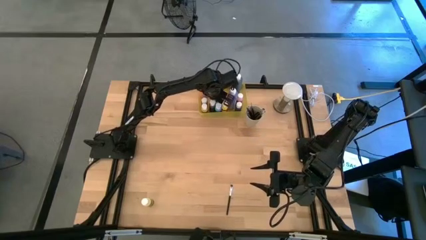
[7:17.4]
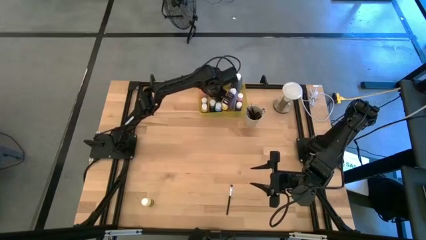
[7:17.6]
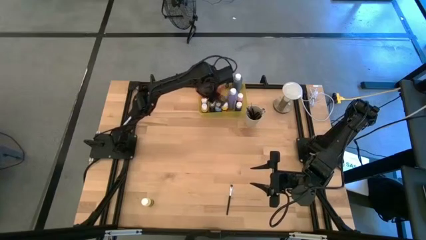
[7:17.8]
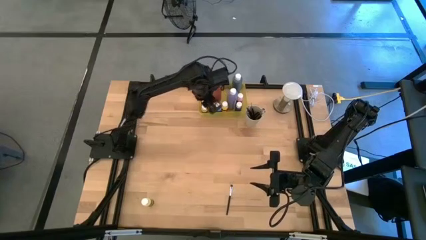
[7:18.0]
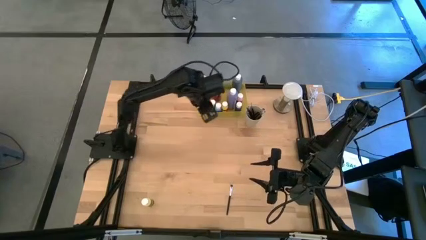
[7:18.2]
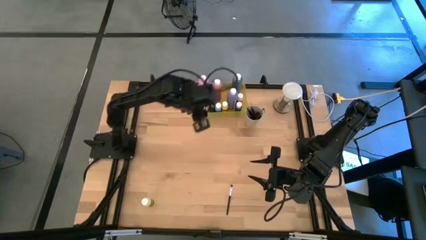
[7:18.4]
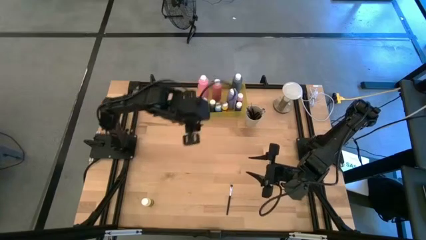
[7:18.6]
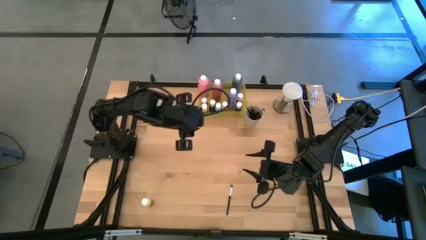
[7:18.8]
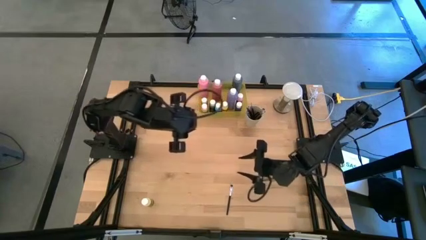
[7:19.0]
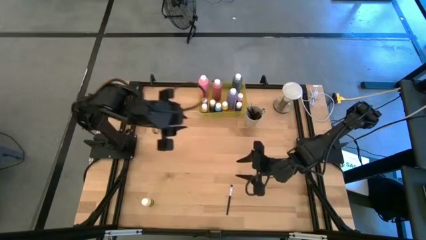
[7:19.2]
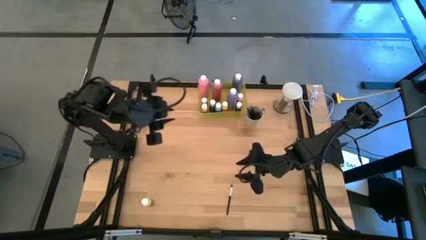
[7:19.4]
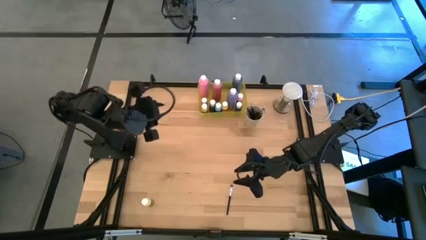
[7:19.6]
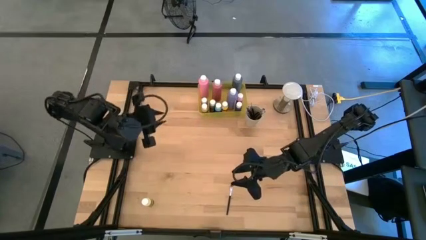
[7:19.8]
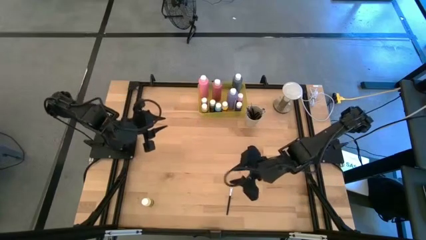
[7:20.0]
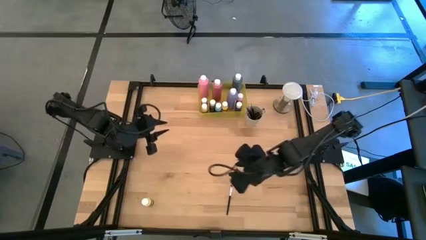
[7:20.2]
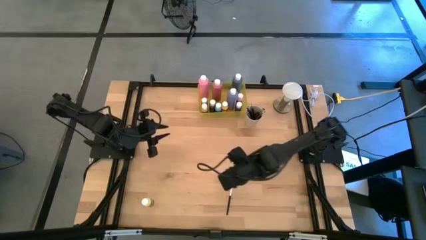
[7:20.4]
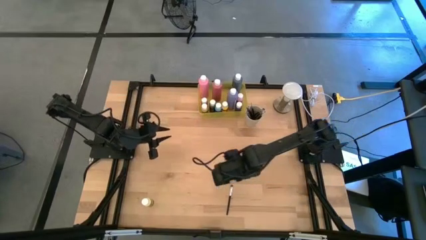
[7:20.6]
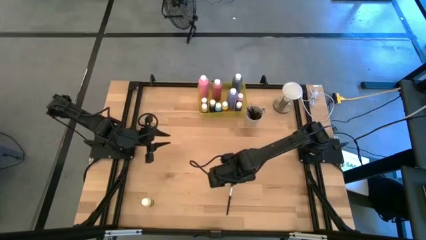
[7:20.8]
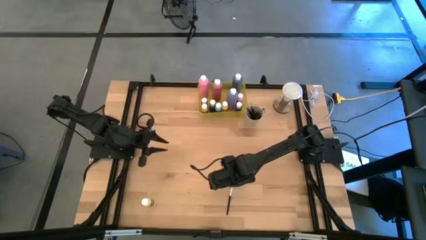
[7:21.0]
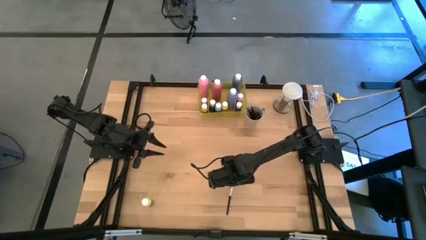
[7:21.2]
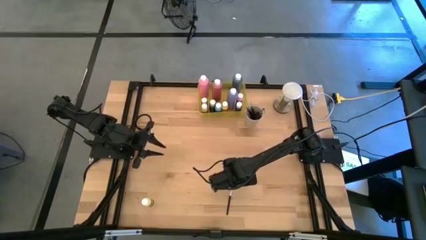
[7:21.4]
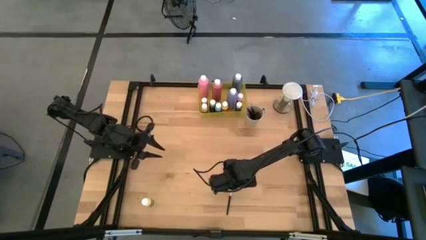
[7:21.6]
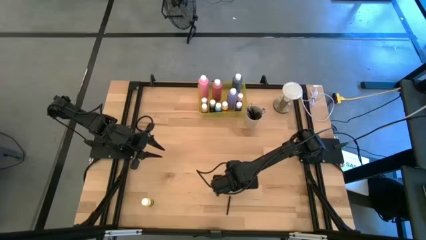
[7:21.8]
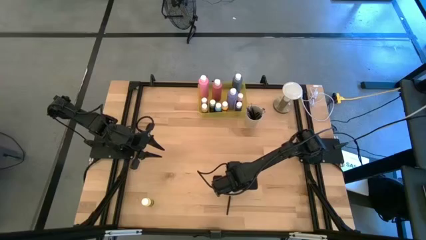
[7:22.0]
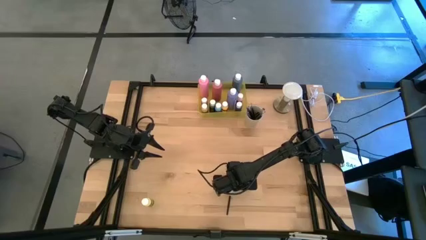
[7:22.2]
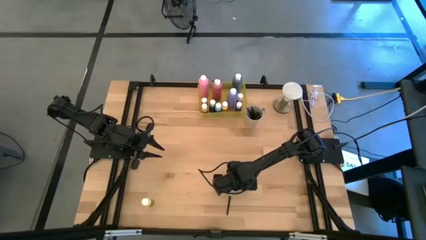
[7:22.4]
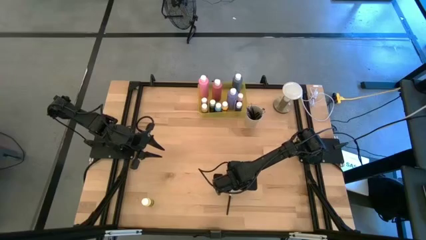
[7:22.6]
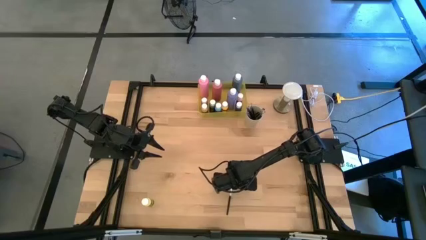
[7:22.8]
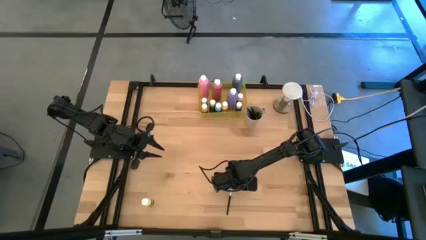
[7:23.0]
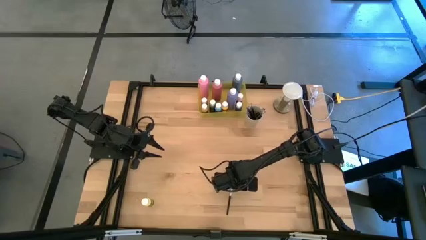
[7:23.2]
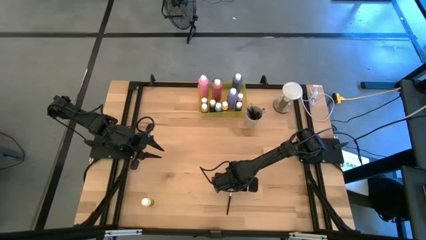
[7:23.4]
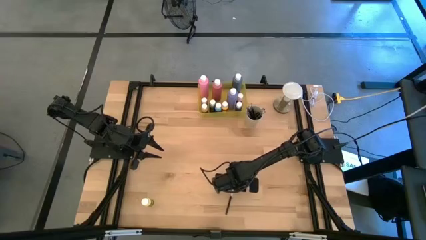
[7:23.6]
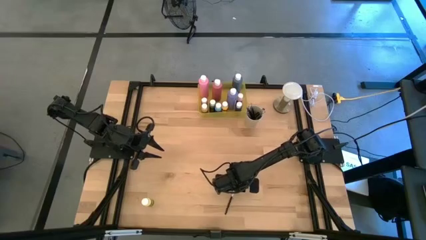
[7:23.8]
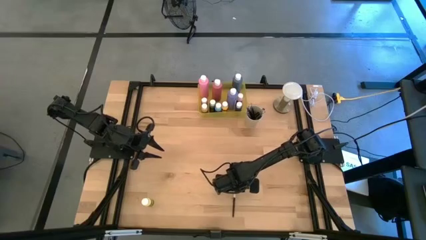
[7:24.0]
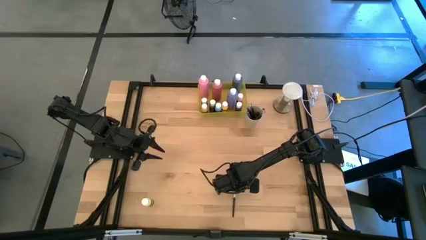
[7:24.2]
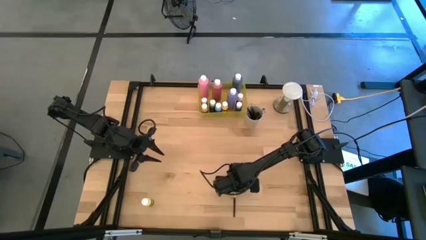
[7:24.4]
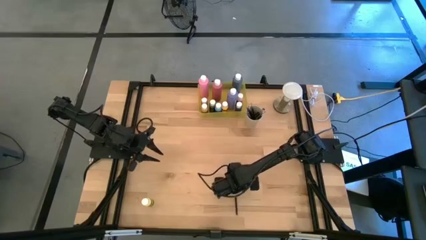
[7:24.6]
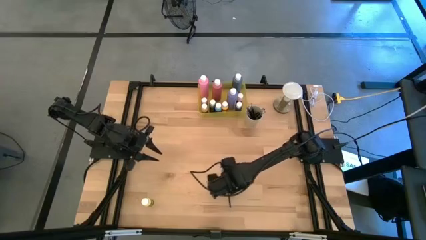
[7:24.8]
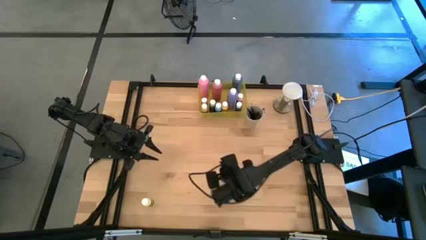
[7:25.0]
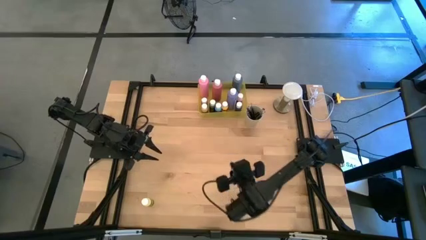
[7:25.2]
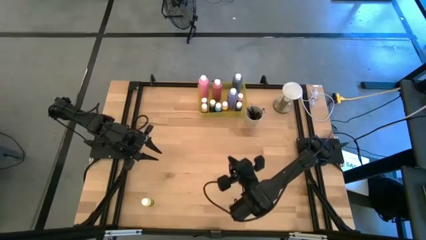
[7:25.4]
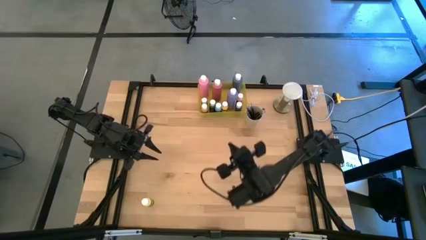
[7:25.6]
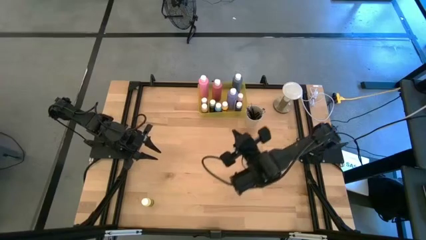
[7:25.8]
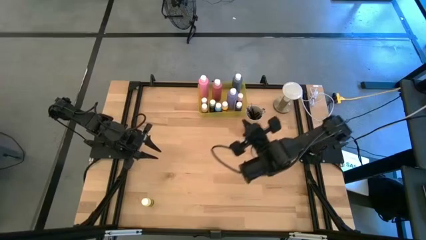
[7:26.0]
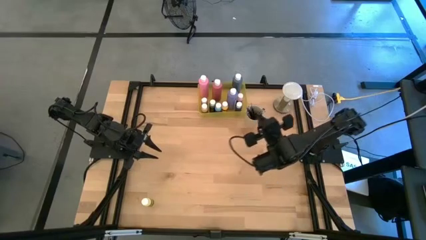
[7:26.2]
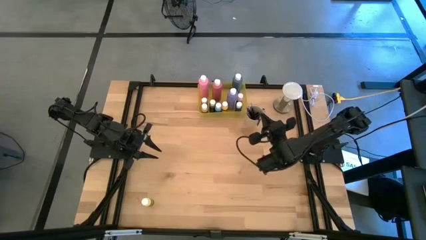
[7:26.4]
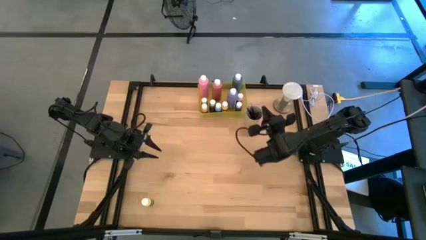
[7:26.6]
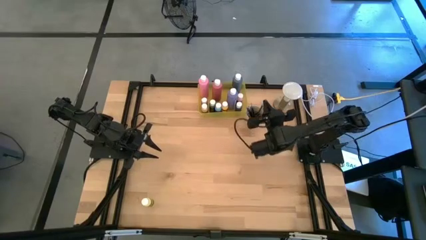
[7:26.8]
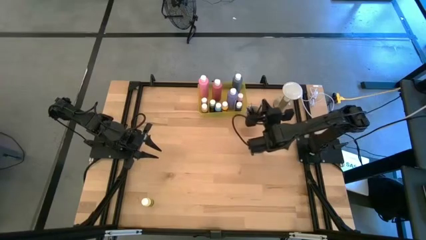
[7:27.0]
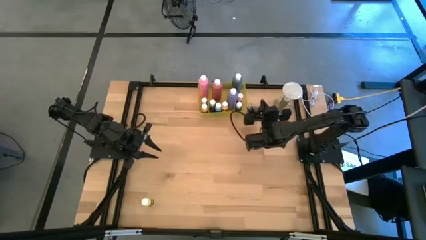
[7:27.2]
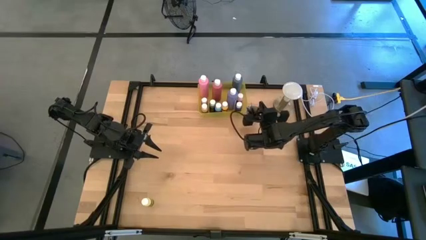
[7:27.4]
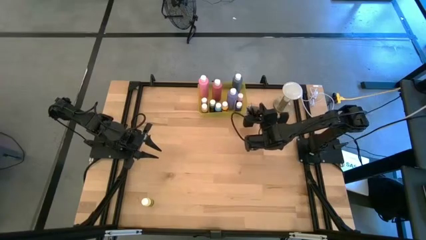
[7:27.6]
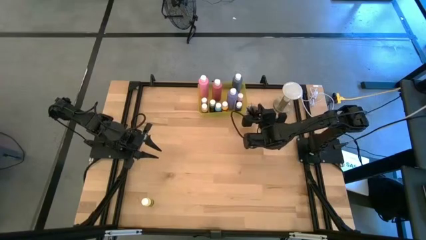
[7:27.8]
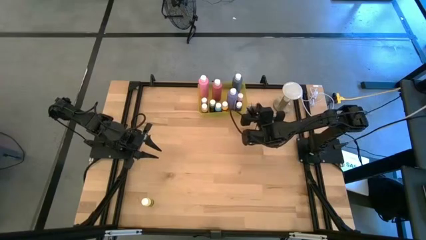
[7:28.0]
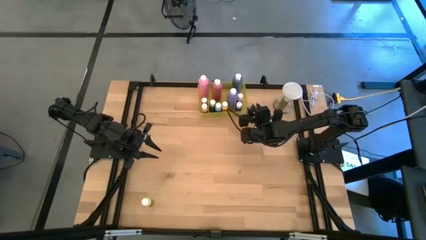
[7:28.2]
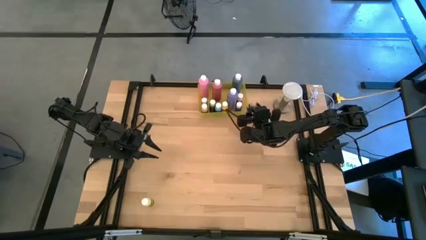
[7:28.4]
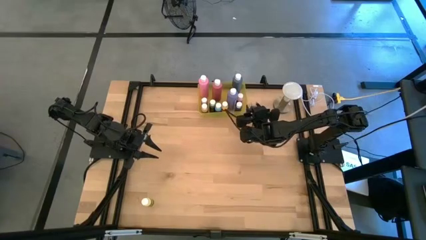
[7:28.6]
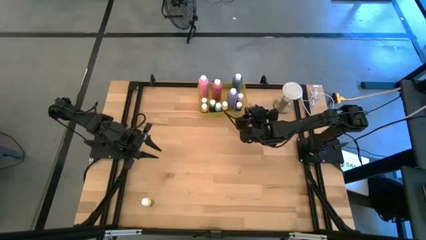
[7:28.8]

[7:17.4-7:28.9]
Task: Pick & Place Paint Supplies
Put the silver paint brush into the white cup

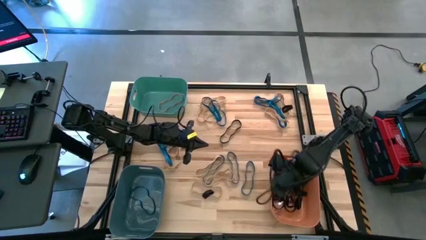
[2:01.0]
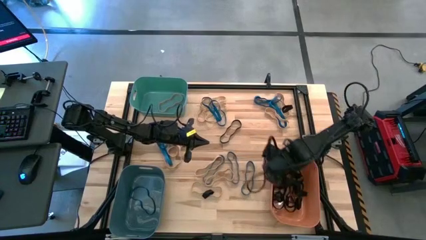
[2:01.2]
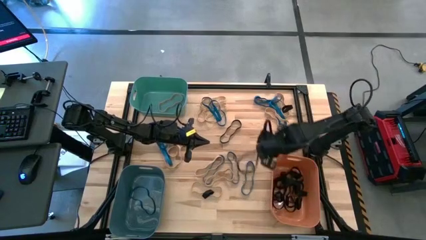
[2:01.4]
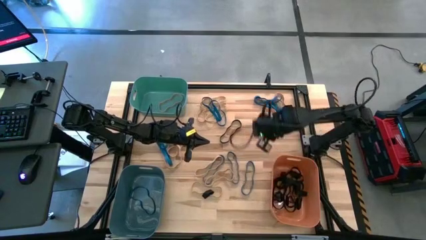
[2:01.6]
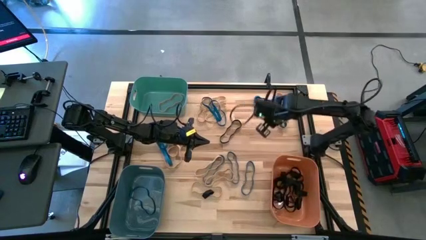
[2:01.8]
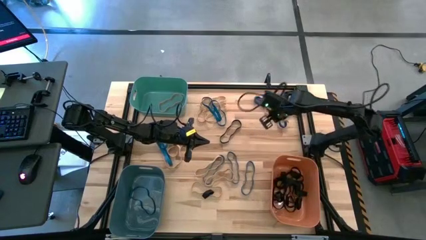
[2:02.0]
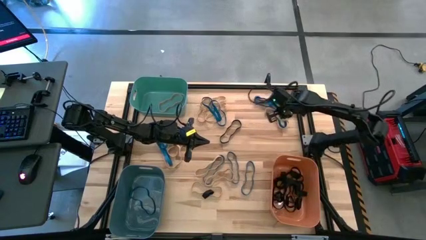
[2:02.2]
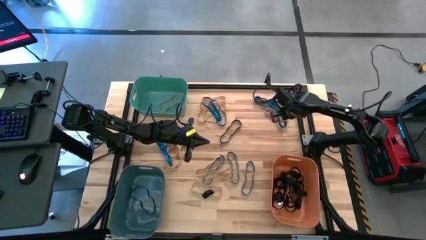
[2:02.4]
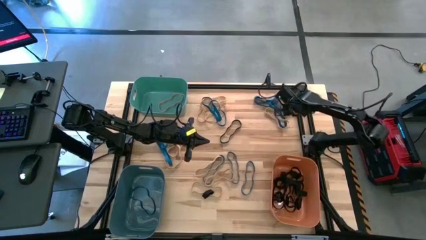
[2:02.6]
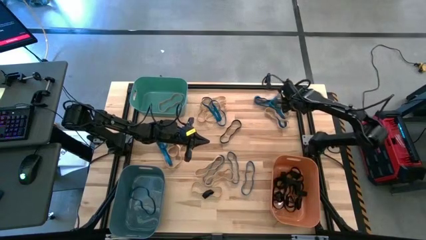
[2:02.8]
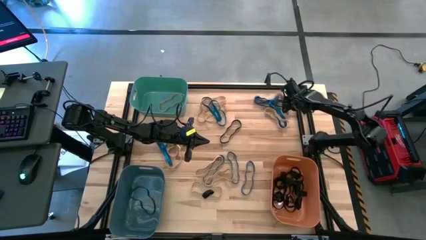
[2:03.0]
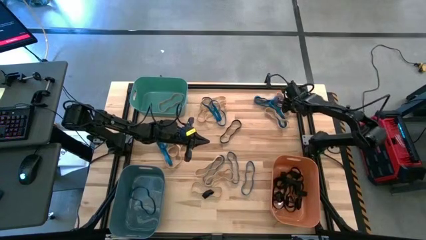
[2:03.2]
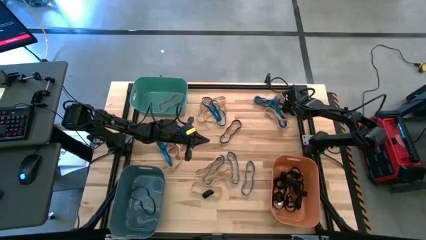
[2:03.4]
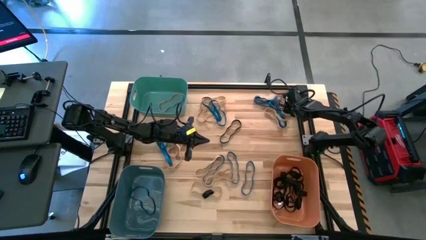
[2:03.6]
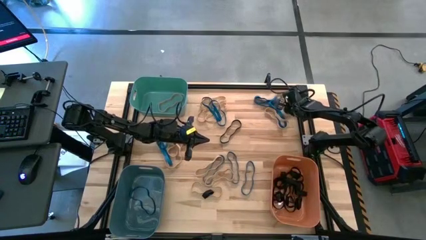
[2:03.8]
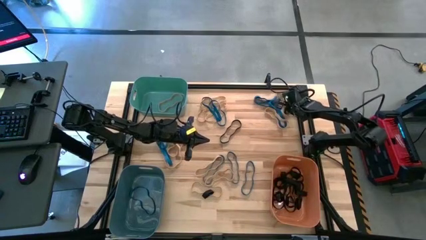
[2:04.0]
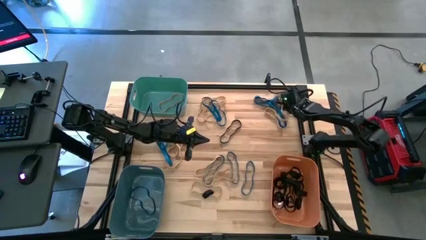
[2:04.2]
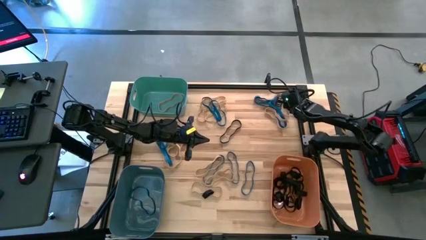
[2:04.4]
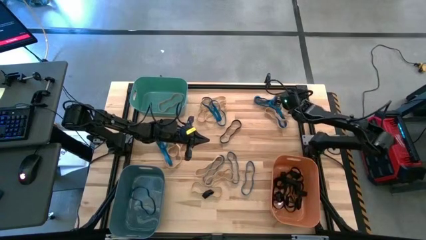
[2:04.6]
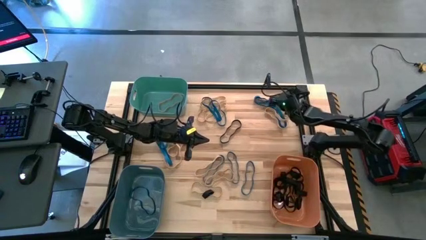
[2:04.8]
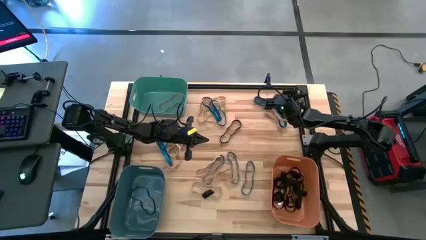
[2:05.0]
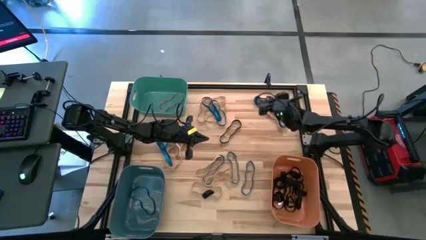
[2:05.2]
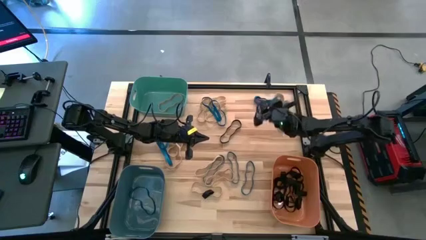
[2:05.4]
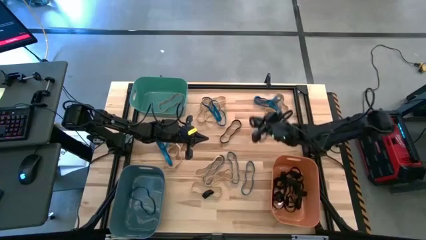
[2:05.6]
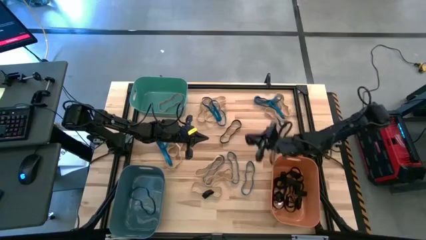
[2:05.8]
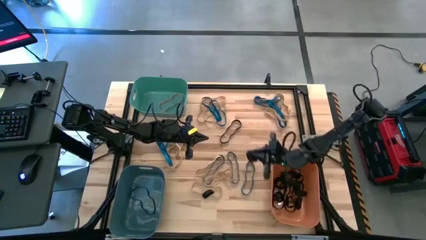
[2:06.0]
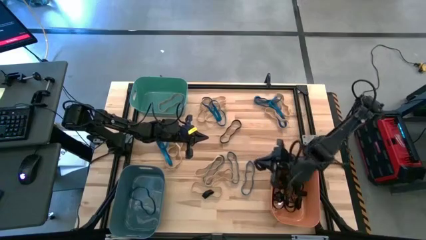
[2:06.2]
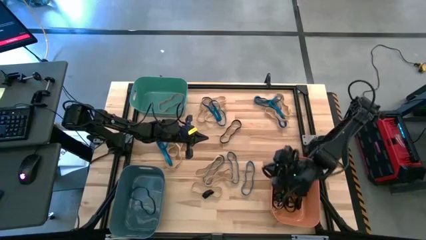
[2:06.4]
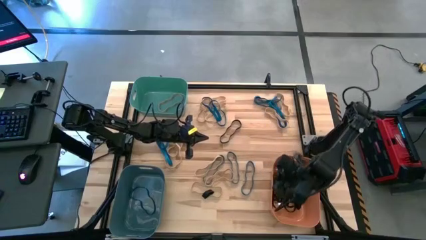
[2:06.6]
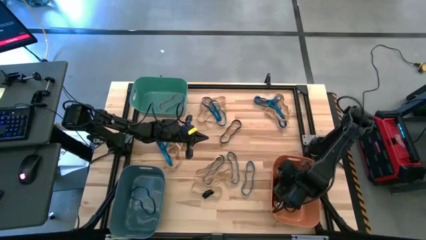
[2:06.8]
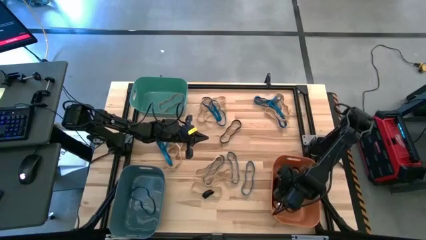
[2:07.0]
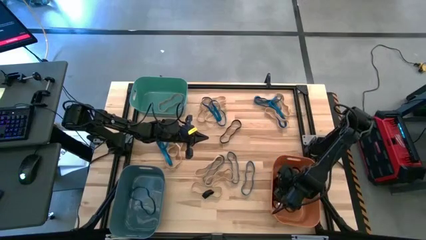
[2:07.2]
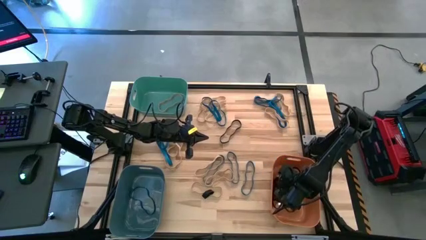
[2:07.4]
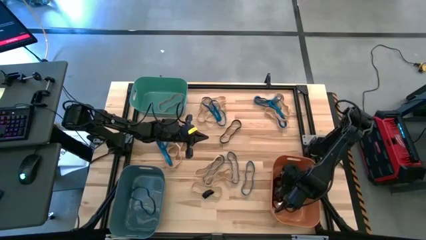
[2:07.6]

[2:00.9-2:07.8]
Task: Sort rubber bands into baskets
Put the black rubber band into the orange bin
